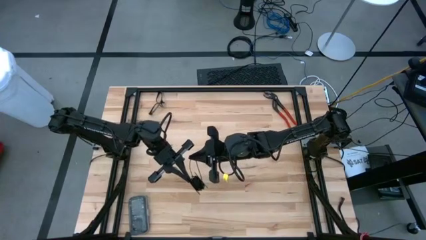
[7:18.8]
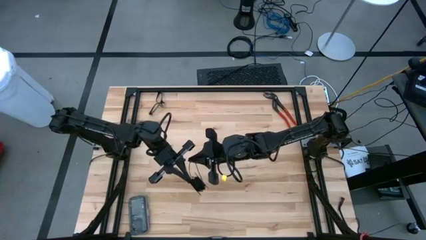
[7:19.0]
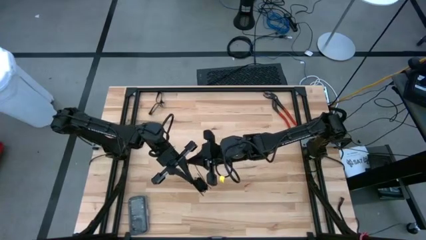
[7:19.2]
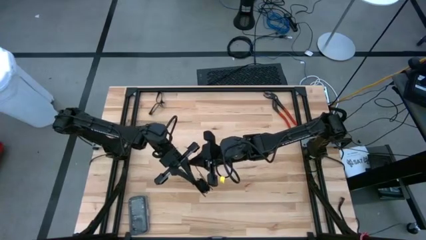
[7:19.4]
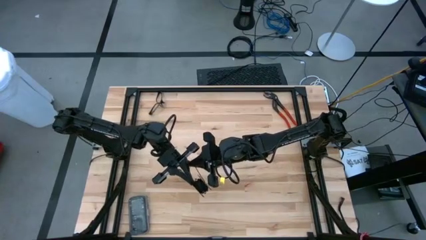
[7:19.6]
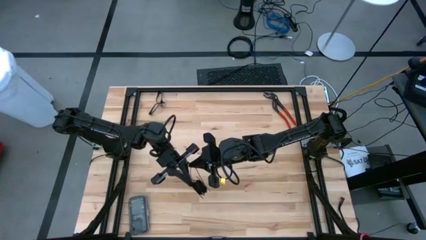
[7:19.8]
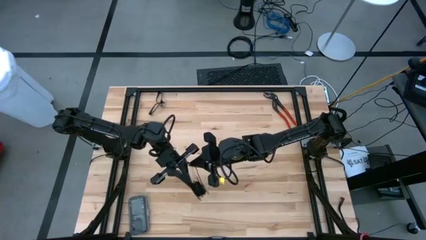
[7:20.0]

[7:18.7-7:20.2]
Task: Coil cords
Coil the black wire onto the spool

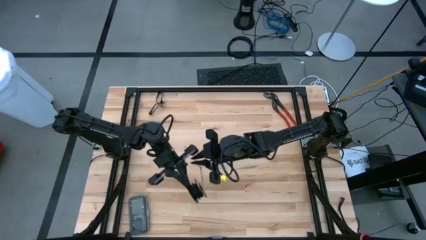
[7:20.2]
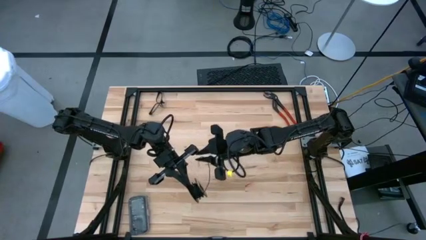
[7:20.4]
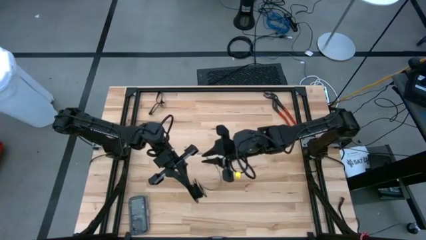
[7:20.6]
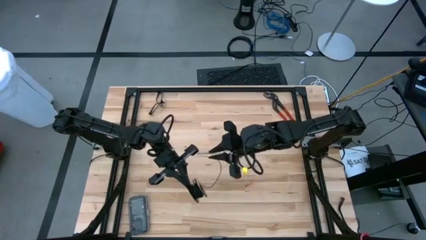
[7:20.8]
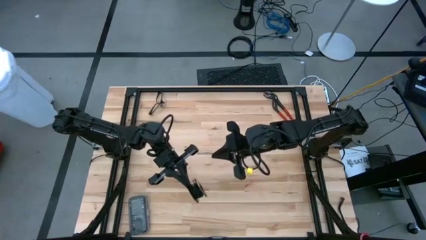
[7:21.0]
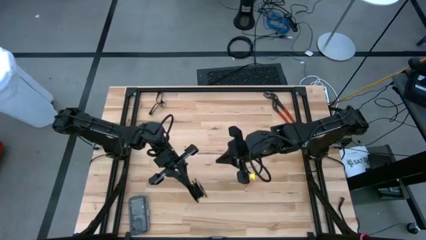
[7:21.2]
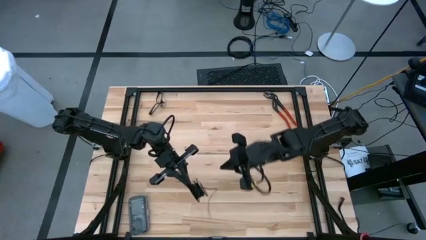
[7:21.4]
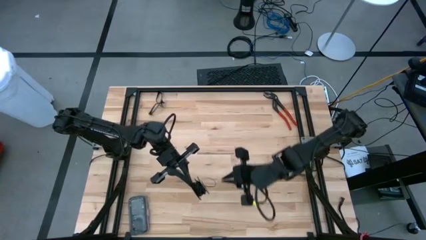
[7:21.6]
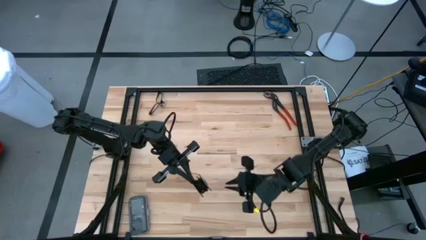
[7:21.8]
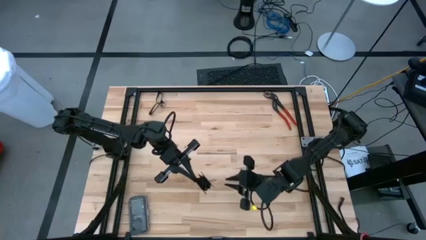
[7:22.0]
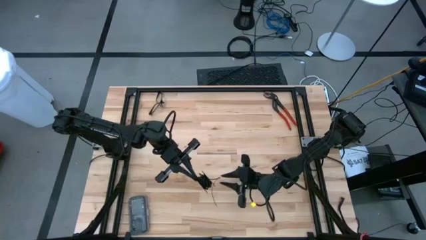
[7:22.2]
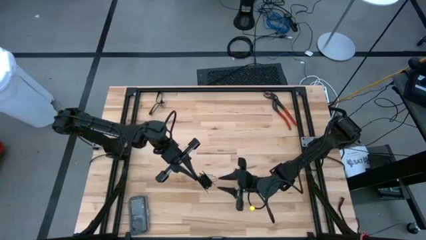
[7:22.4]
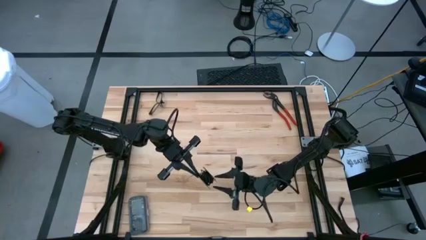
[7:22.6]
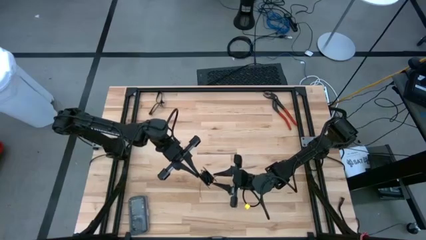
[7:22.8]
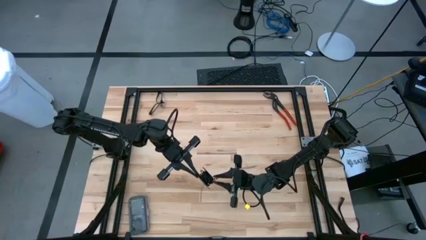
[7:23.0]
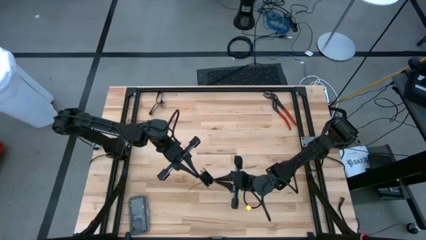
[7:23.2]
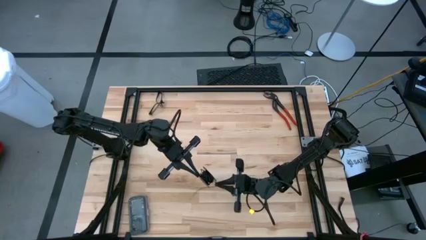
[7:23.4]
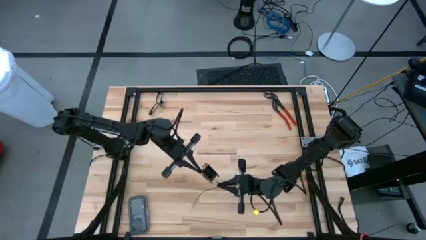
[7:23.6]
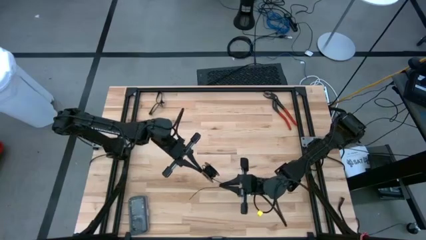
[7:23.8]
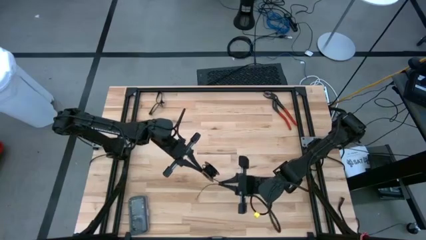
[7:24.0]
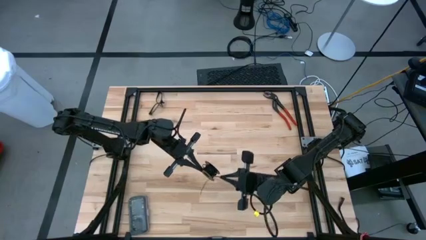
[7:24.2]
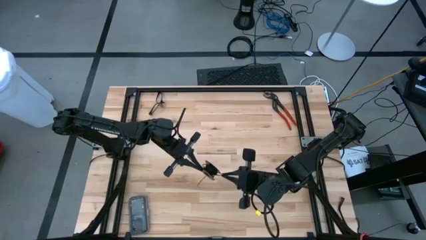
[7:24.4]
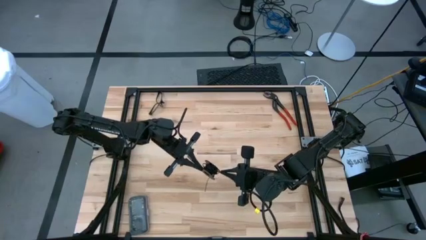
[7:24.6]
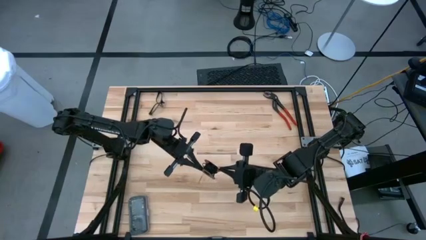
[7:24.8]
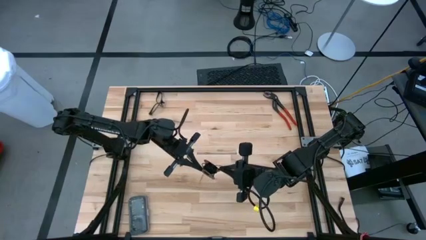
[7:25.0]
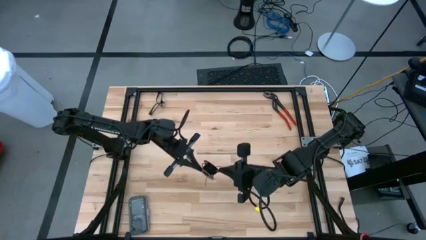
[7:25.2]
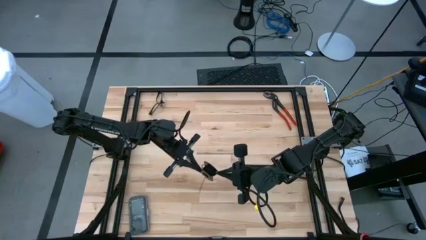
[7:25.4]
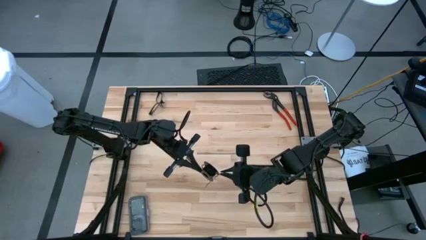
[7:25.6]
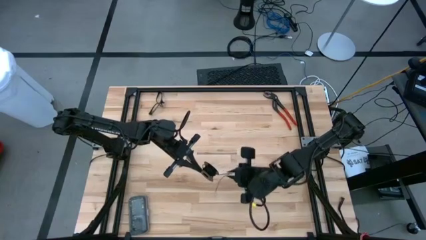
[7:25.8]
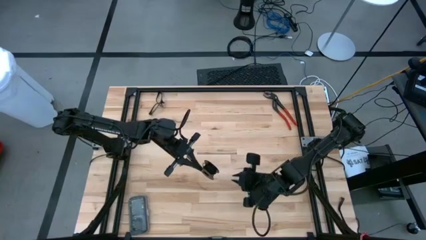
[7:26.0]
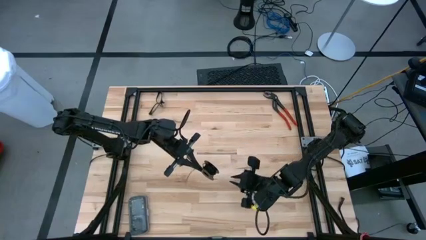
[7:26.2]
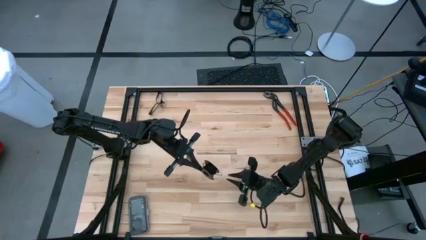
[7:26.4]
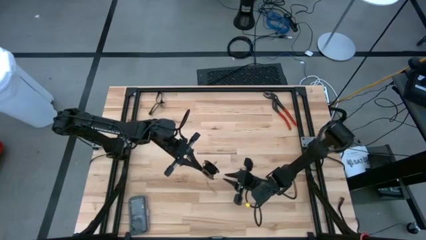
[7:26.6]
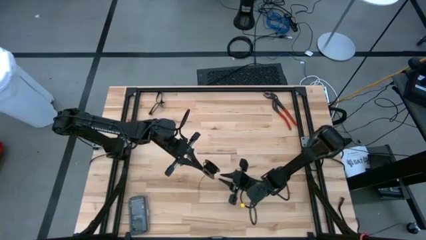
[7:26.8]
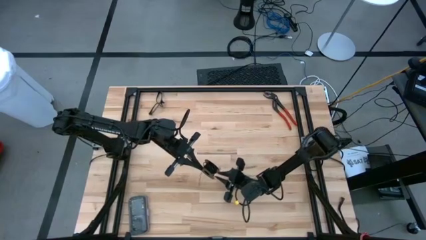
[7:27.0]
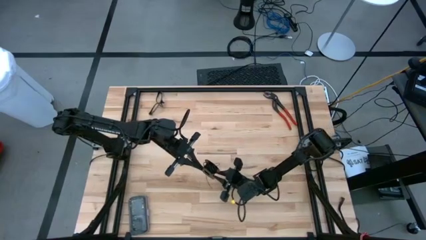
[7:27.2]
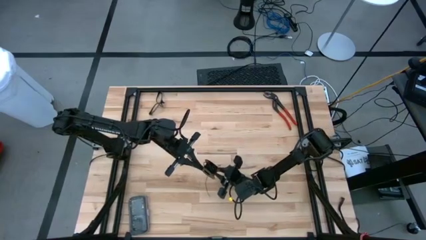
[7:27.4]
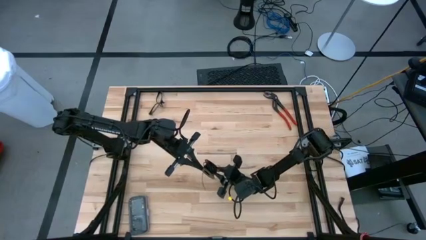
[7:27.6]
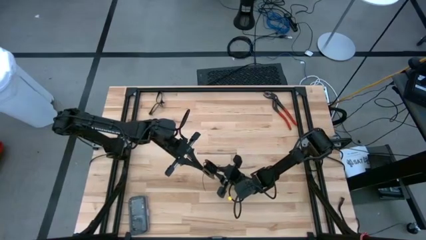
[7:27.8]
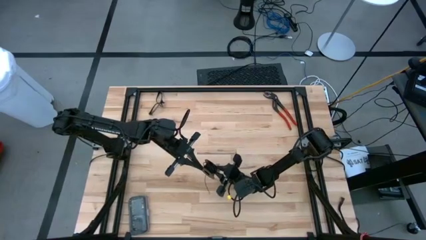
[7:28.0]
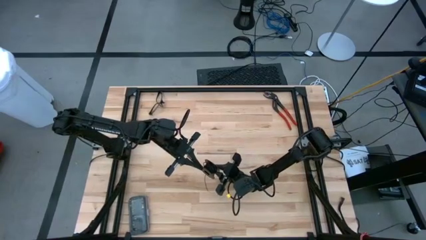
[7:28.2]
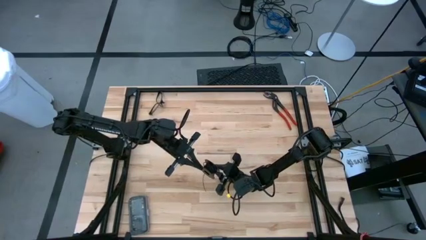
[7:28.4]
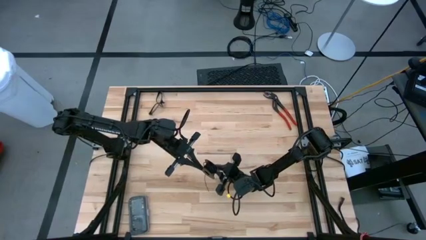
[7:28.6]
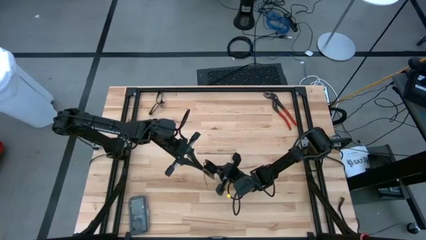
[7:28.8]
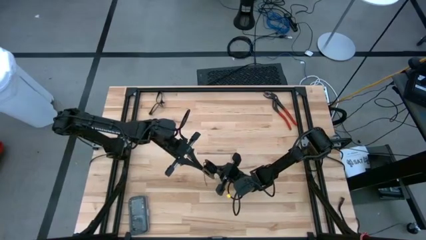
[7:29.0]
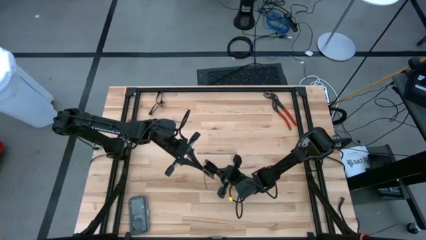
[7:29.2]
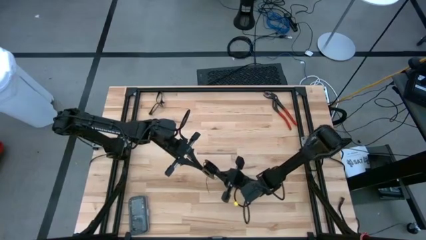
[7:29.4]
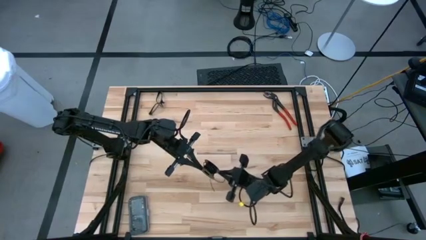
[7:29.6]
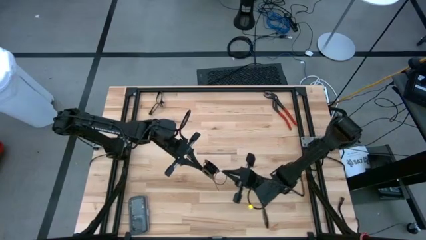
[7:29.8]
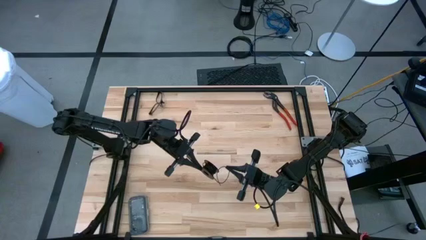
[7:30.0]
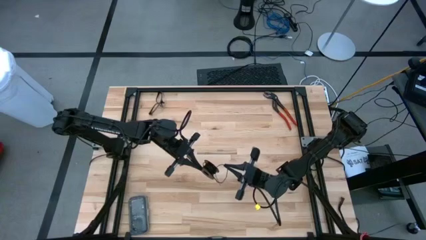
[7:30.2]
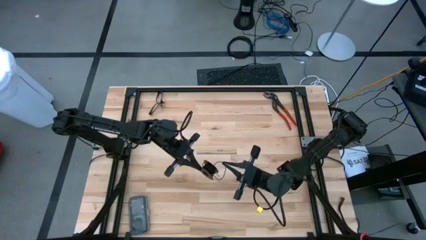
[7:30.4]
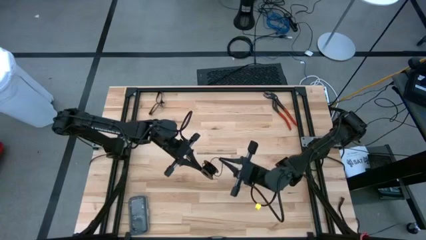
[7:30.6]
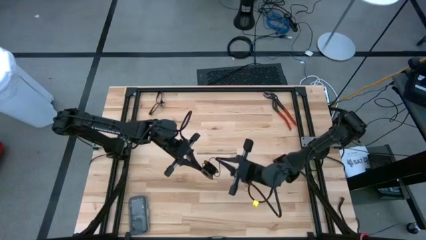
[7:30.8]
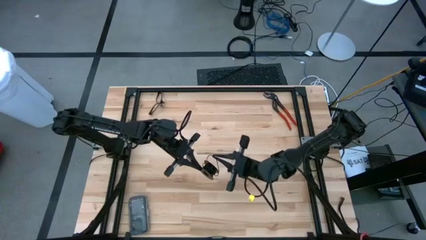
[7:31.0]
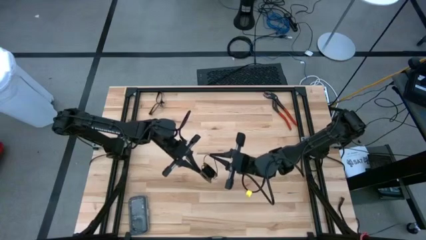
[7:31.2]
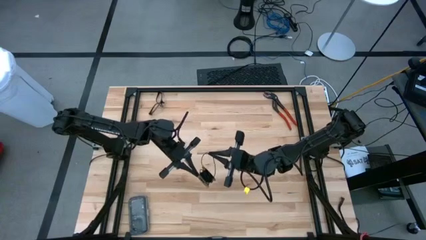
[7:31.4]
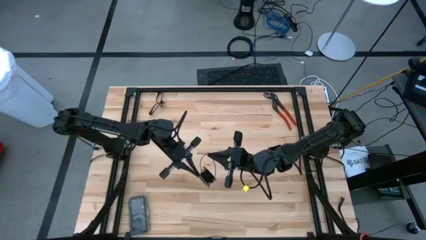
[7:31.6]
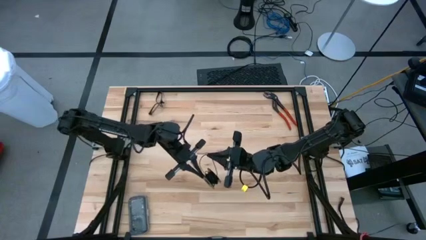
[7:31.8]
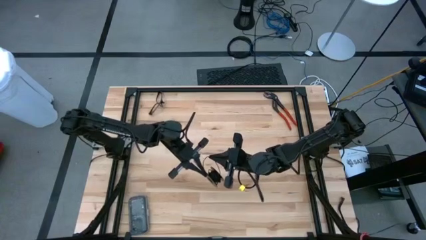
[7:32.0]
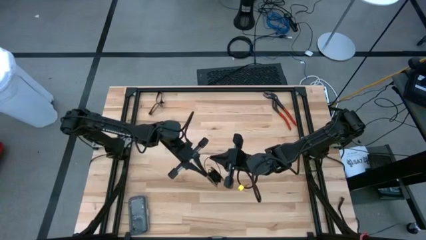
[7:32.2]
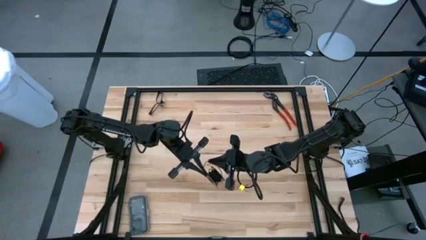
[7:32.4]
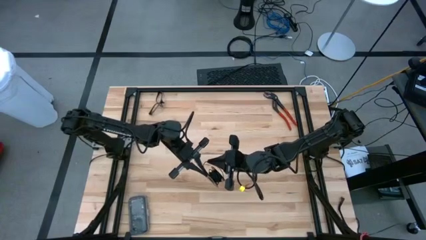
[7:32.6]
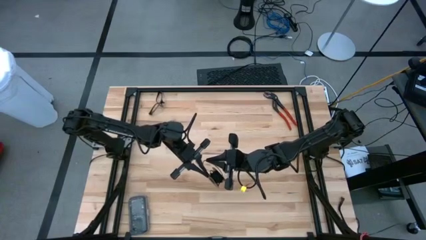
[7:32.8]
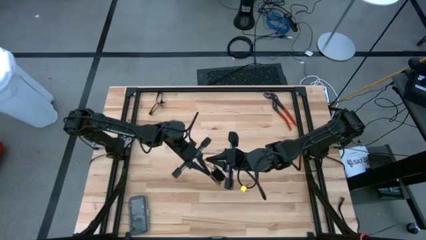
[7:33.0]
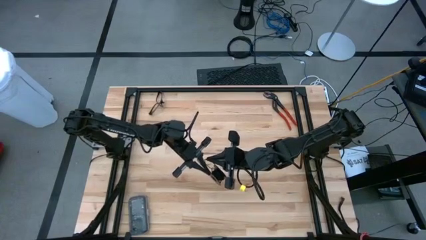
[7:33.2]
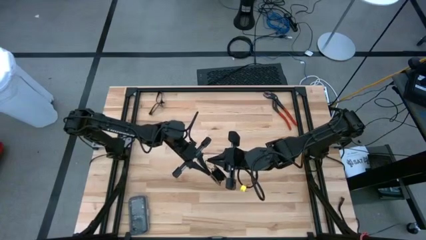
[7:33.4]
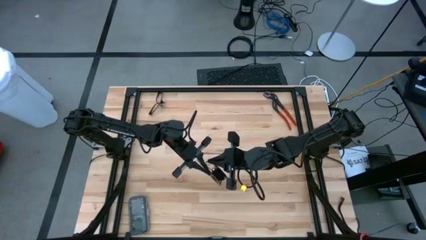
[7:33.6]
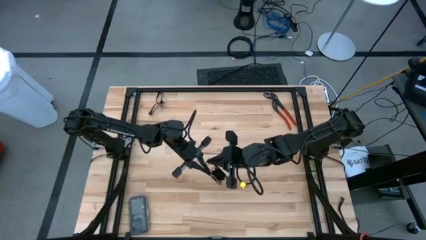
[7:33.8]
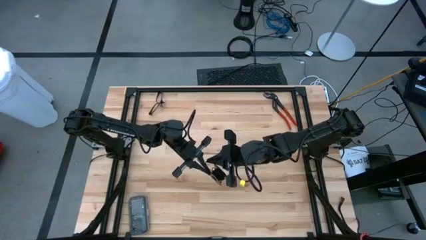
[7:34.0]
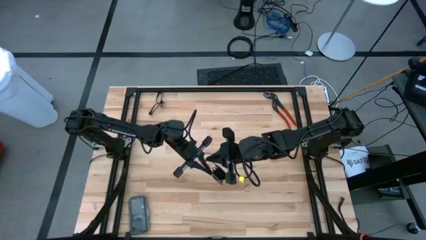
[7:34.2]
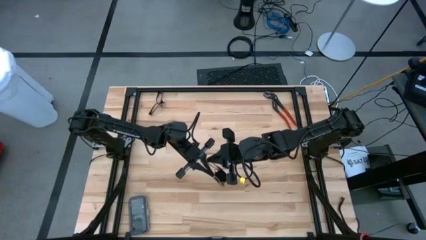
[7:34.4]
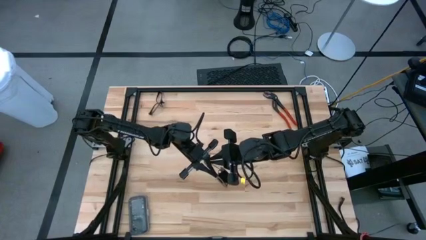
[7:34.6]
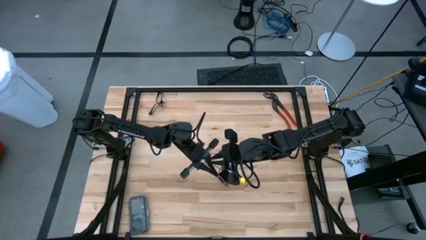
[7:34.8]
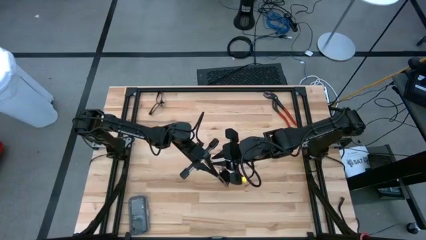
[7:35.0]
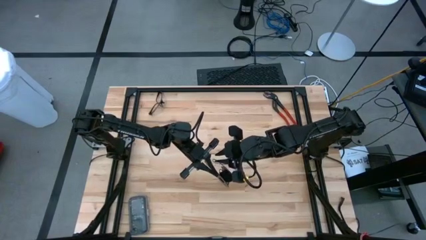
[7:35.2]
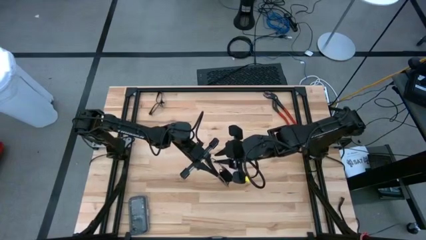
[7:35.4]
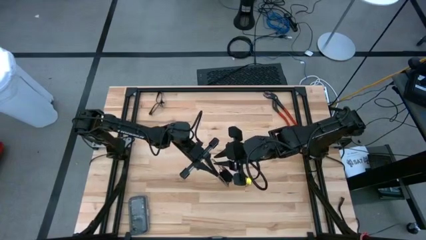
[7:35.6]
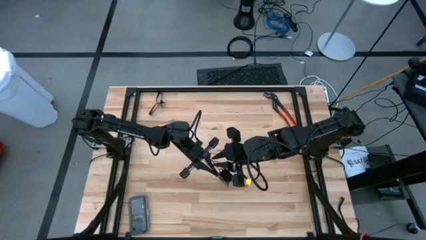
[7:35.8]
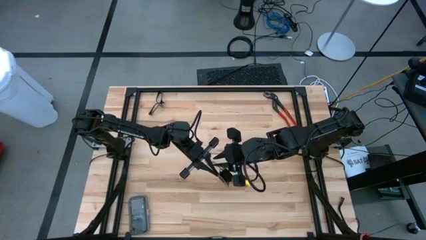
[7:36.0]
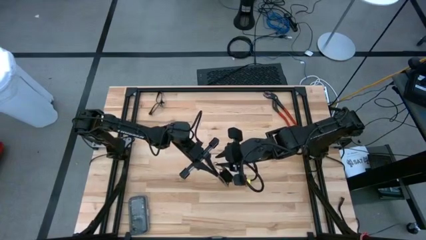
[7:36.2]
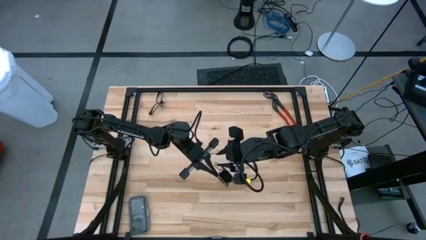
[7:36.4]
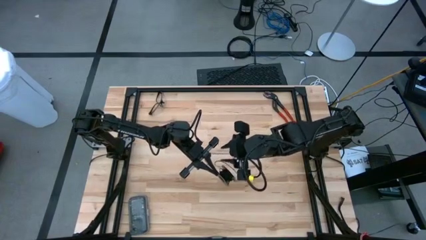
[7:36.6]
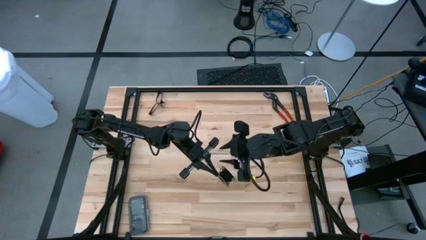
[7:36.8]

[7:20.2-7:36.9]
Coil the black wire onto the spool
